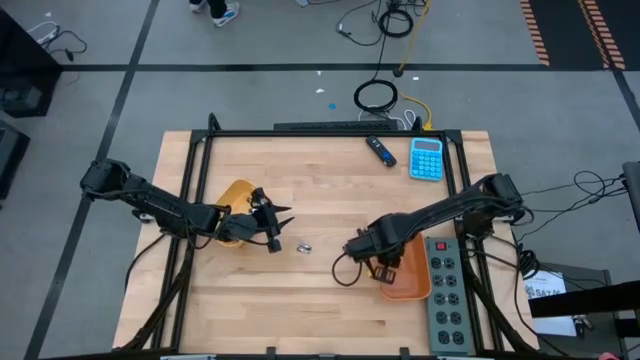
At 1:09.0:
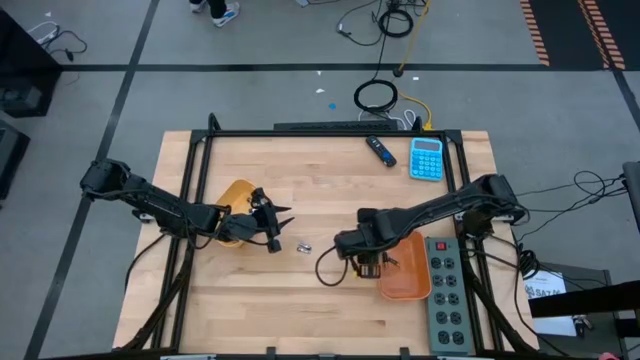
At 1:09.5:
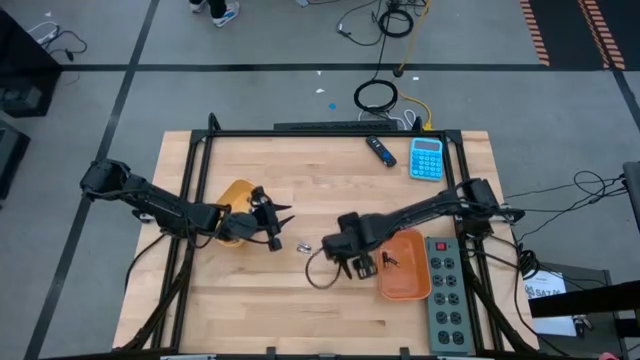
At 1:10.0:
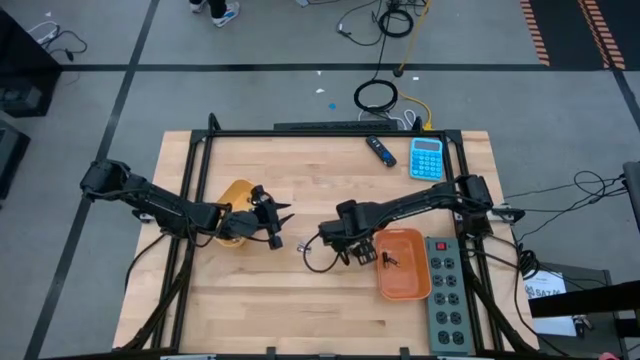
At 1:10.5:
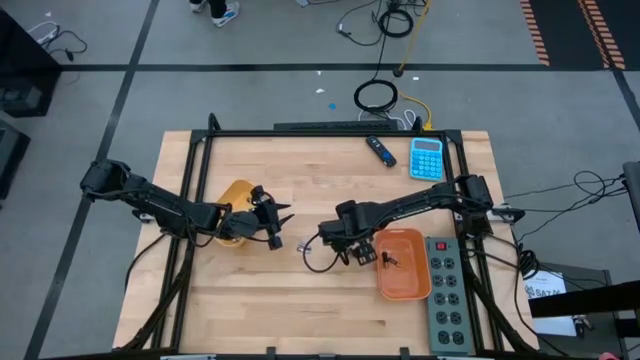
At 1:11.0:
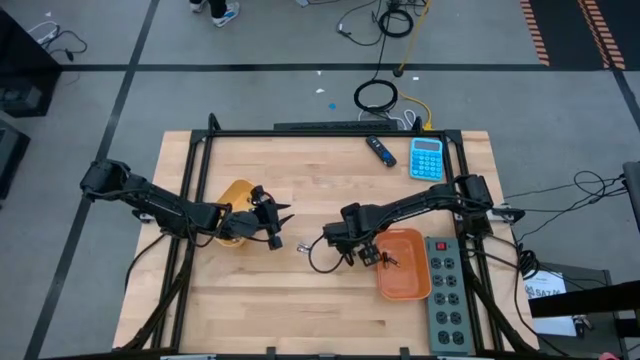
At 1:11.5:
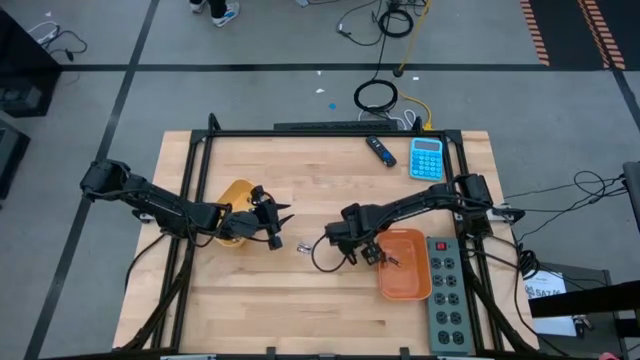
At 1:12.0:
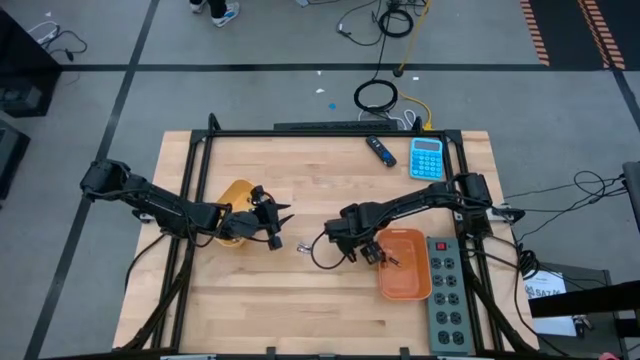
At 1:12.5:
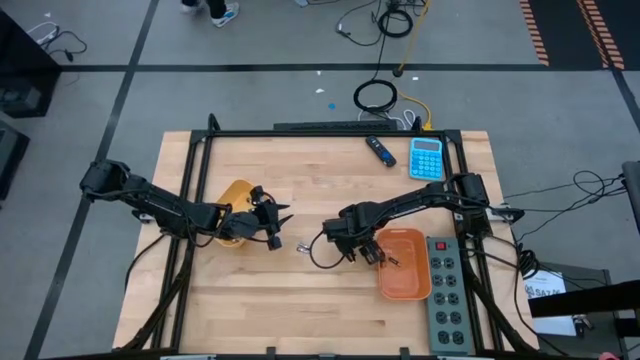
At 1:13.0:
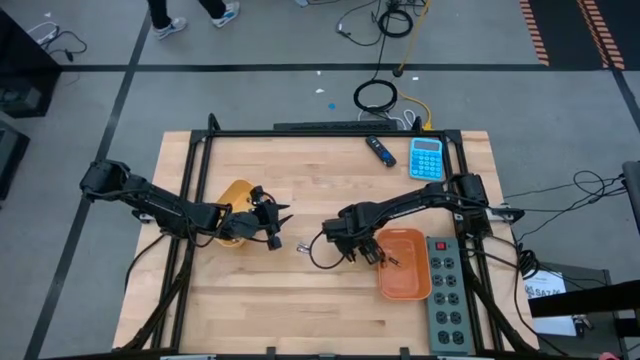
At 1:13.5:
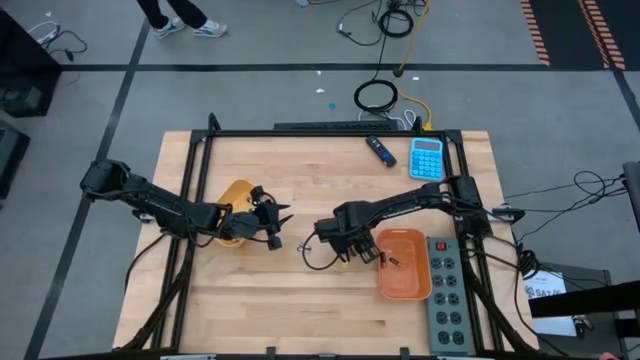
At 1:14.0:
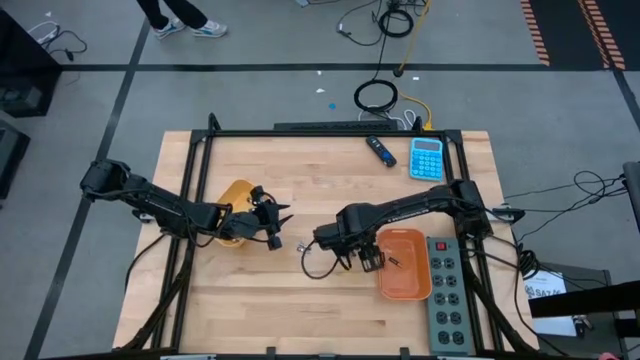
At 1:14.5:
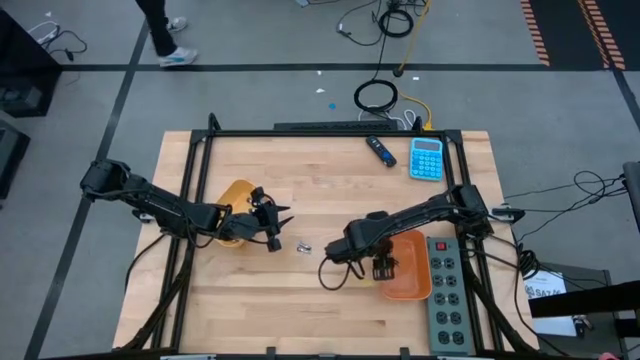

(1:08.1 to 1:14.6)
Task: Sort batteries
Put the black battery into the orange bin

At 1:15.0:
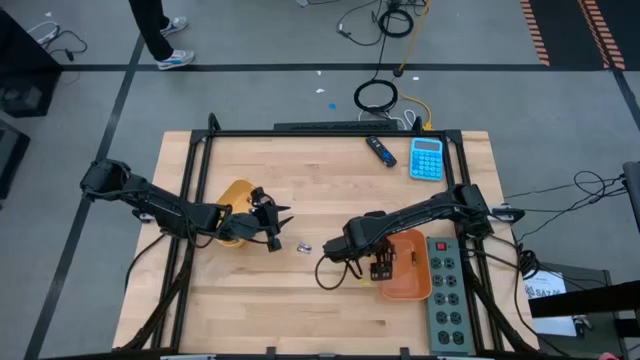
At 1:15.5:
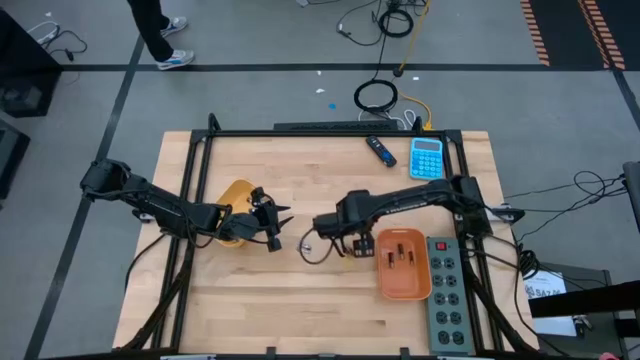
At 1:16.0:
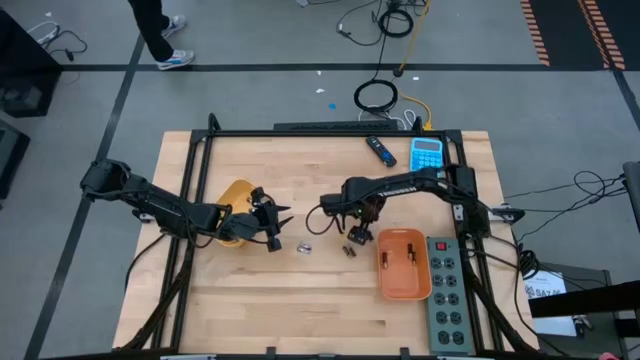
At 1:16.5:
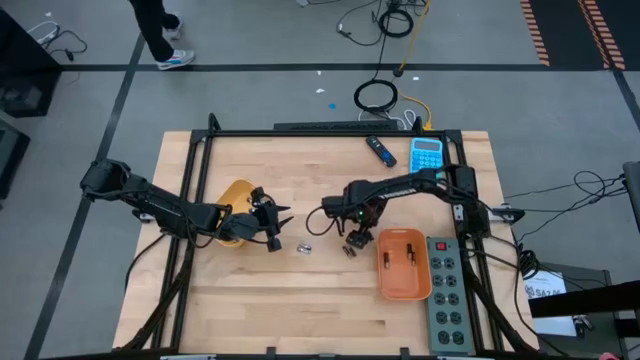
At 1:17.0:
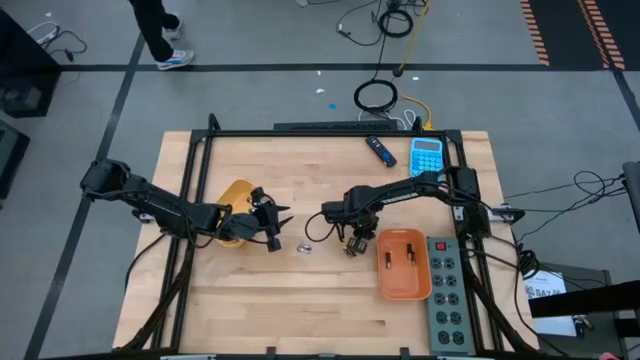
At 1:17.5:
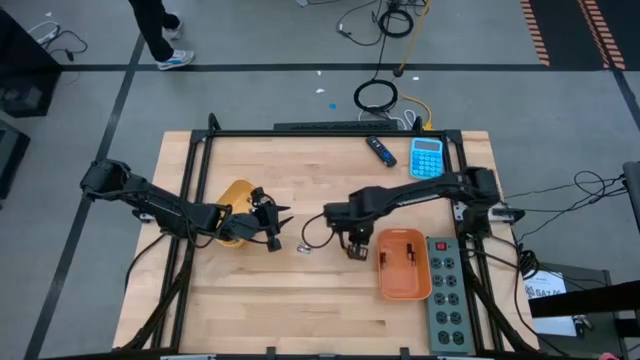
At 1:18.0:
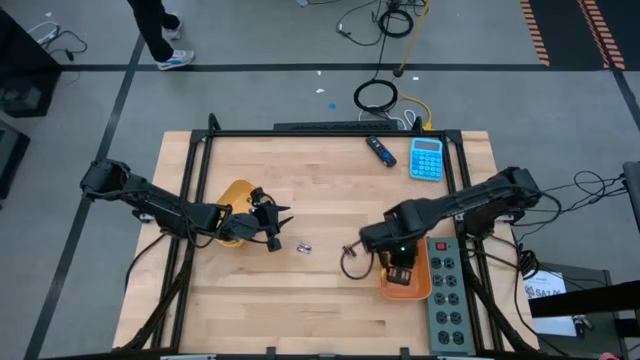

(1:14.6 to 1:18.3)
Put the black battery into the orange bin

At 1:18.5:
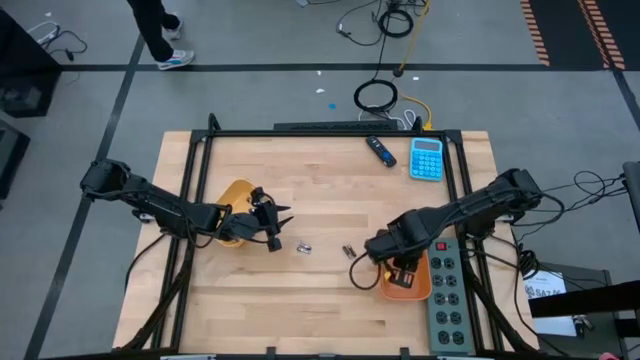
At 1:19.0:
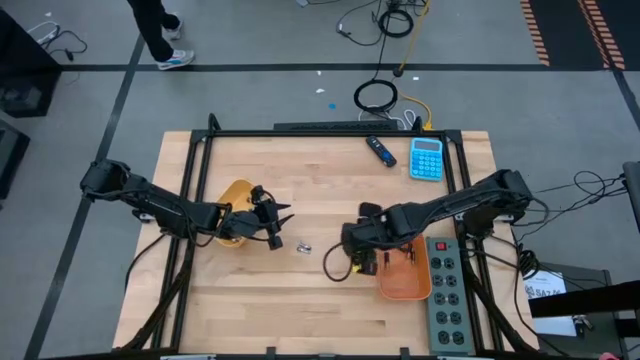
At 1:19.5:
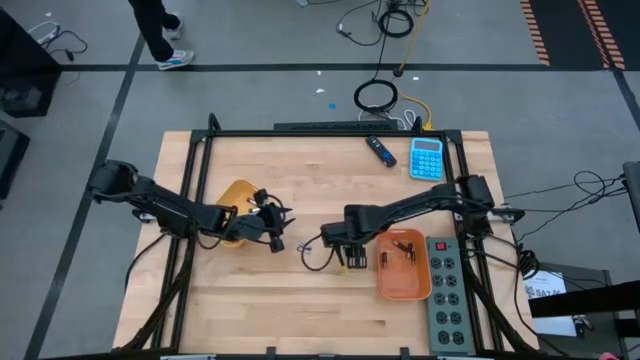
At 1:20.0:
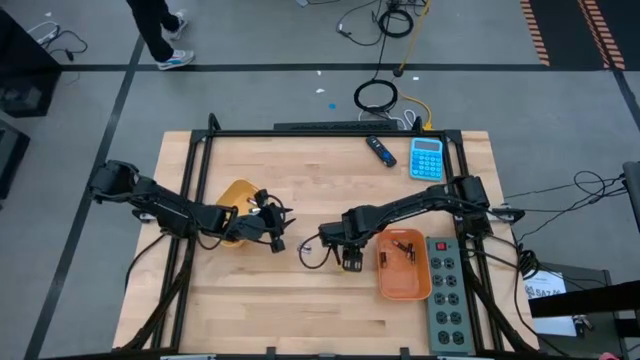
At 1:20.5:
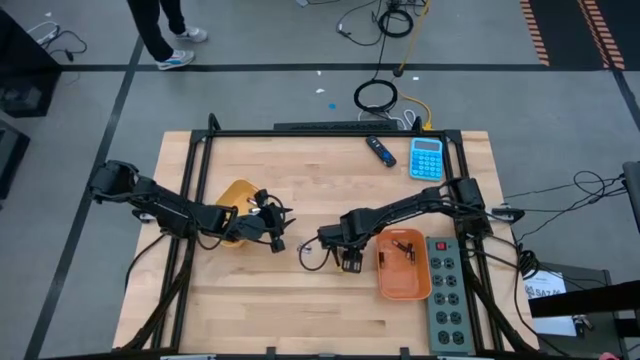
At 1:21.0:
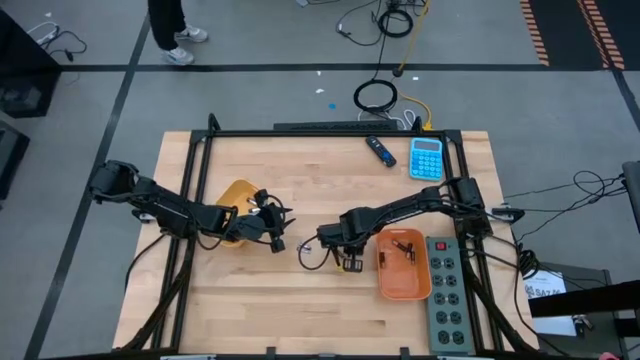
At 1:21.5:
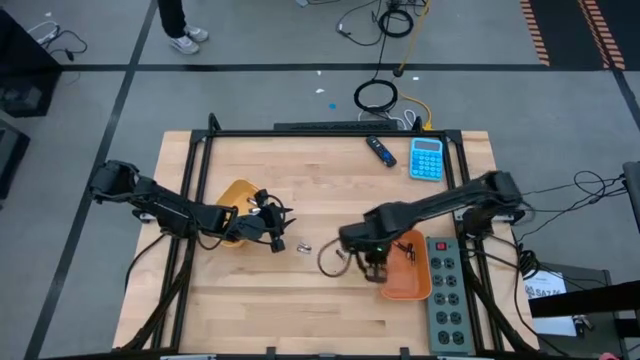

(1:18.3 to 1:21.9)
Put the black battery into the orange bin

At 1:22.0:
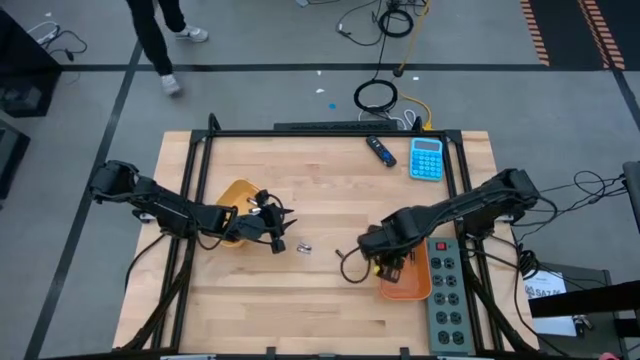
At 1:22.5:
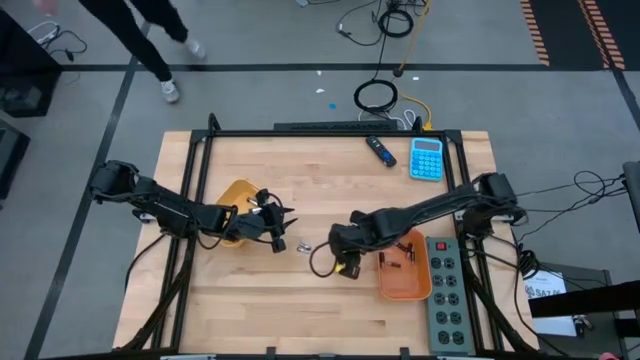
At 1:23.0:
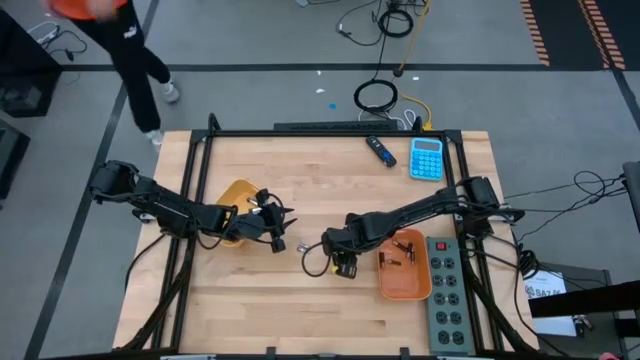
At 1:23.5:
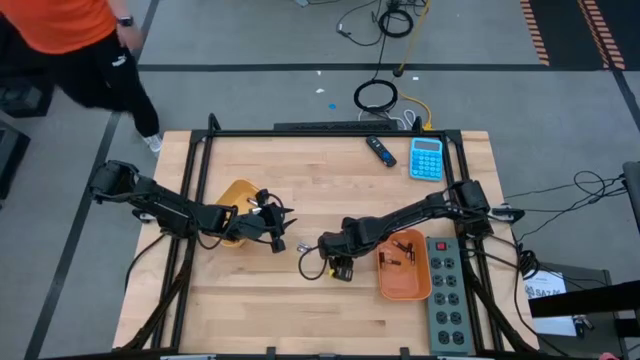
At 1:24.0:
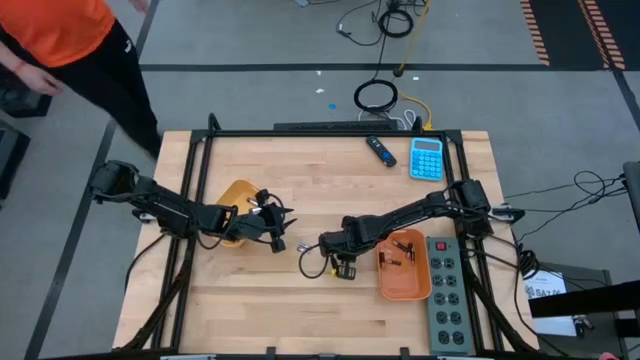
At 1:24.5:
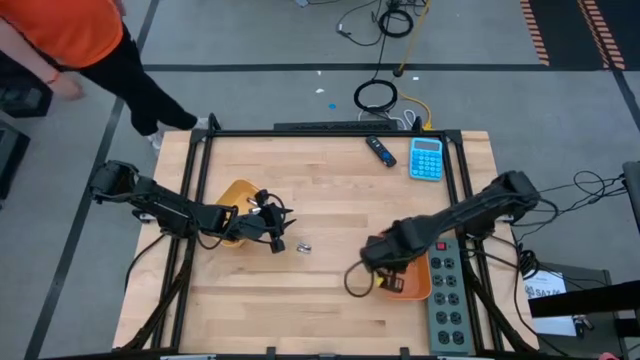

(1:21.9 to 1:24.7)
Put the black battery into the orange bin

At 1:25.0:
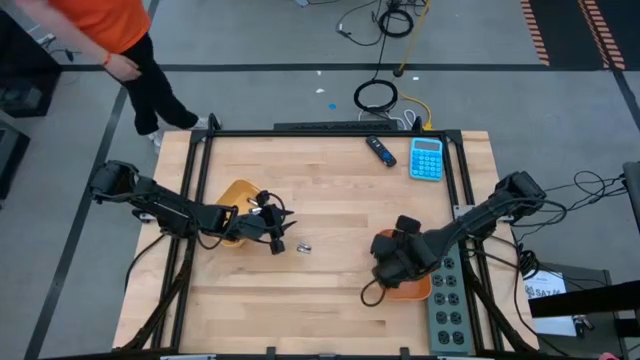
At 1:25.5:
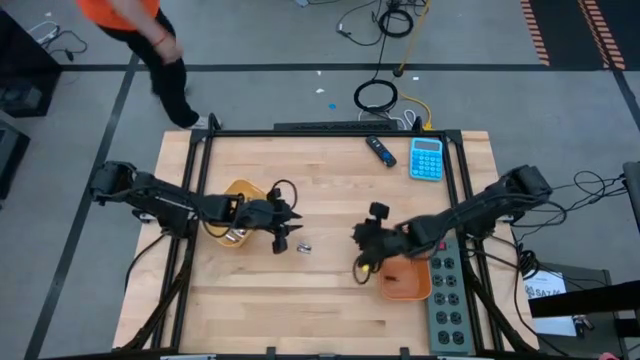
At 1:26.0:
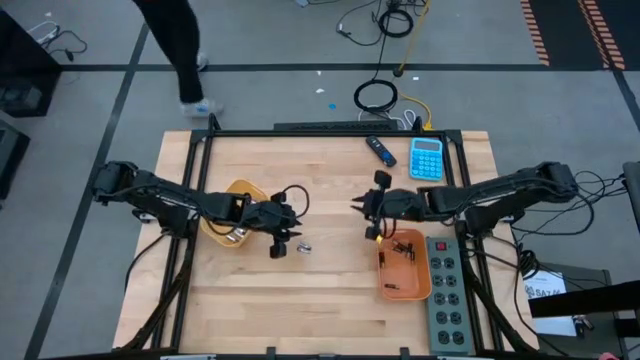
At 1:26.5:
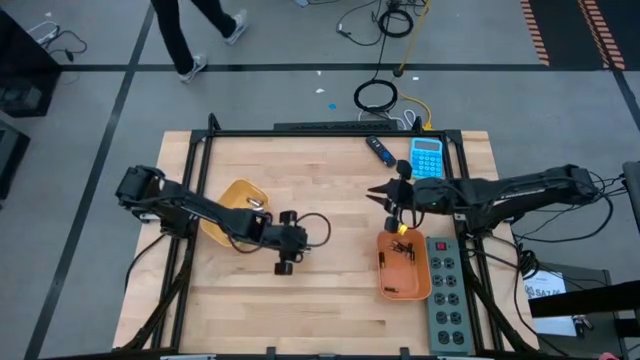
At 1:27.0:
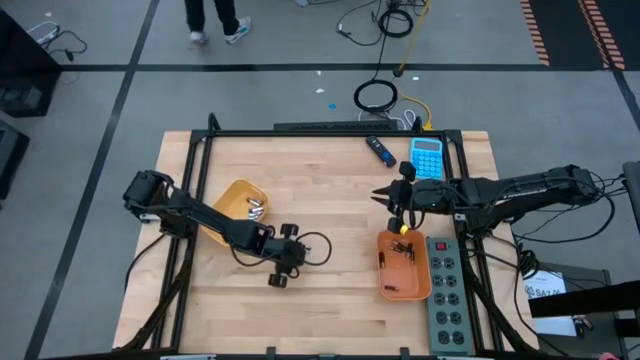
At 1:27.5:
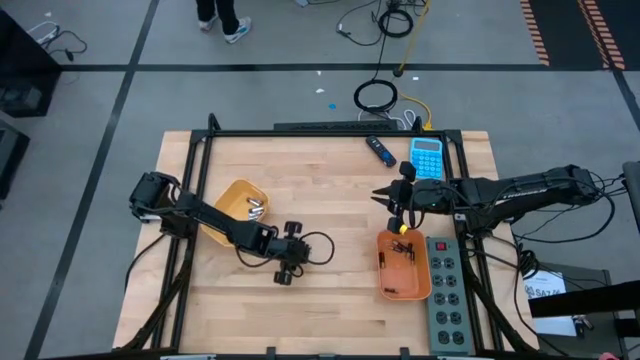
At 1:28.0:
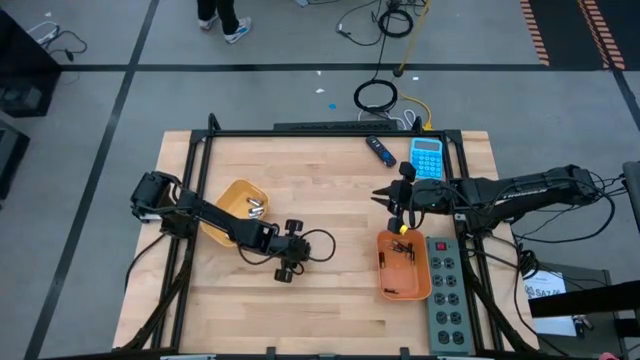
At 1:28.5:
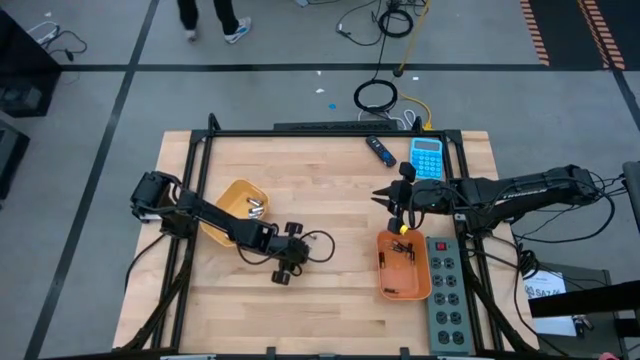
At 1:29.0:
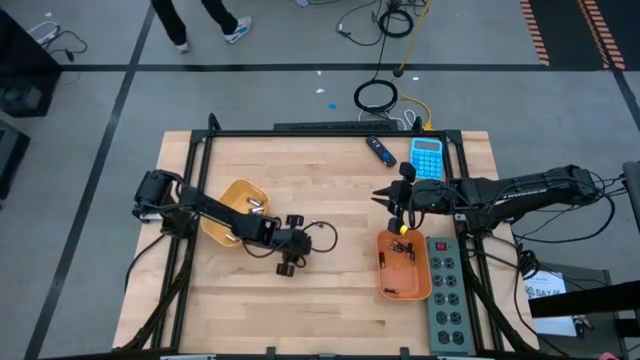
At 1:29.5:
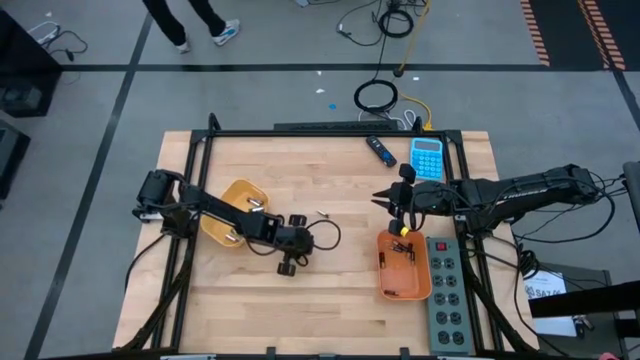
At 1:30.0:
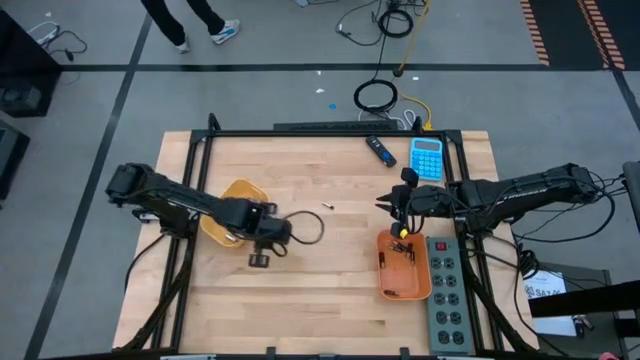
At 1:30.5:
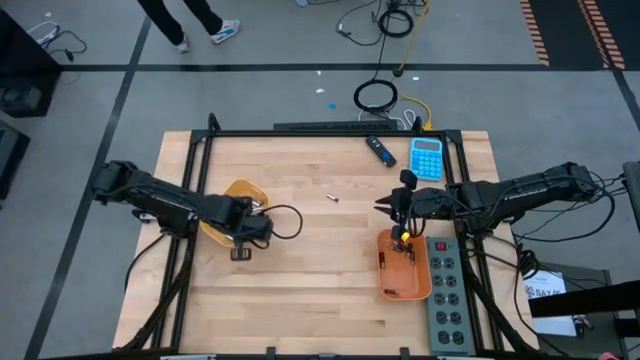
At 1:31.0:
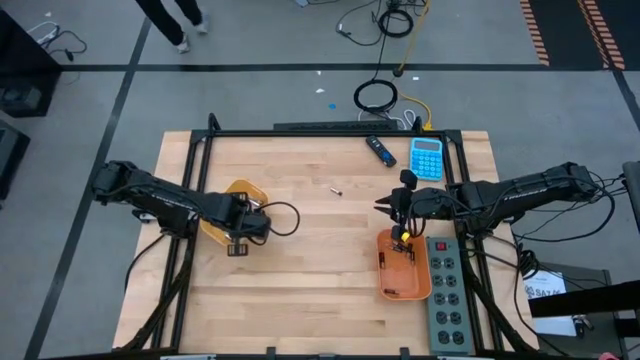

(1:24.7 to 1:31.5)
Put the white battery into the yellow bin
